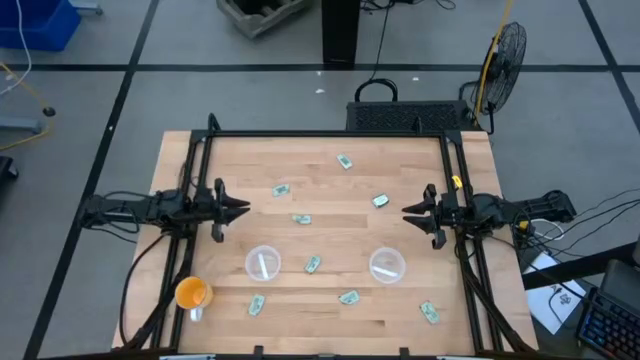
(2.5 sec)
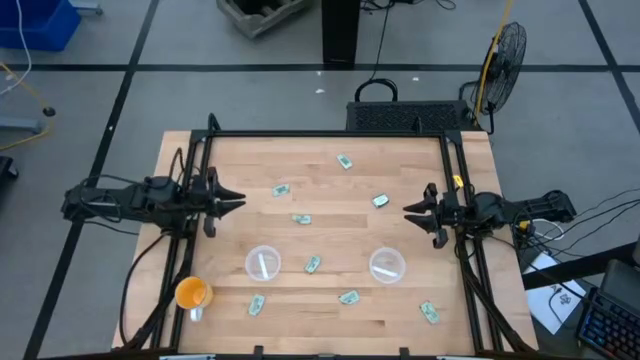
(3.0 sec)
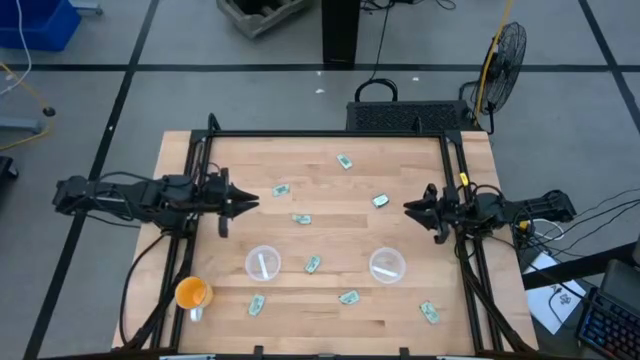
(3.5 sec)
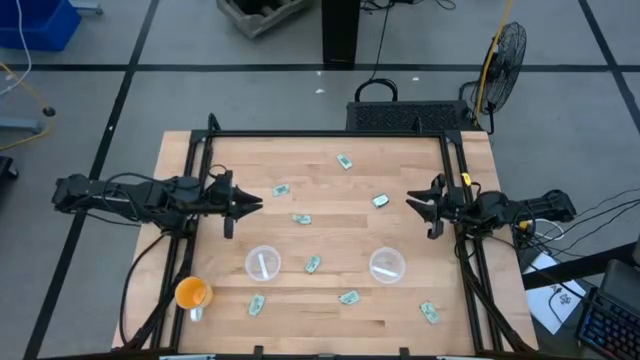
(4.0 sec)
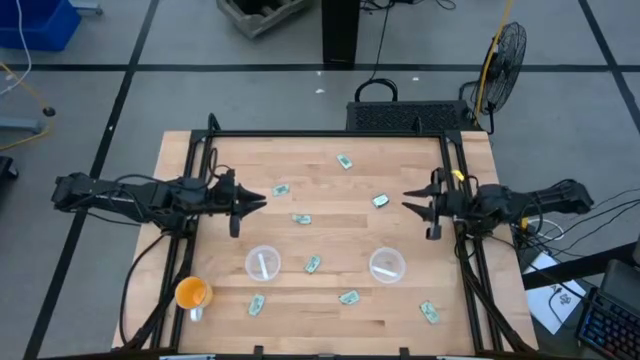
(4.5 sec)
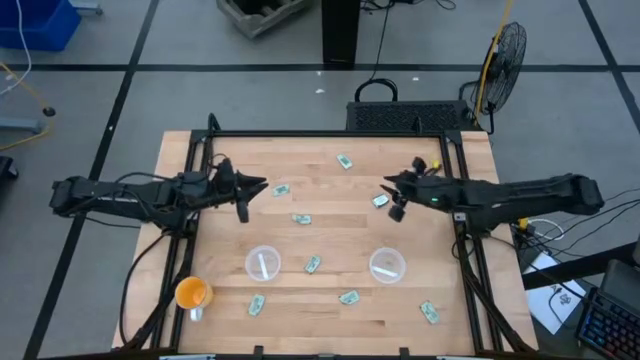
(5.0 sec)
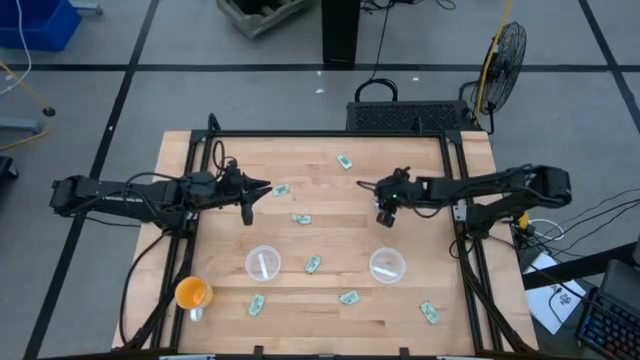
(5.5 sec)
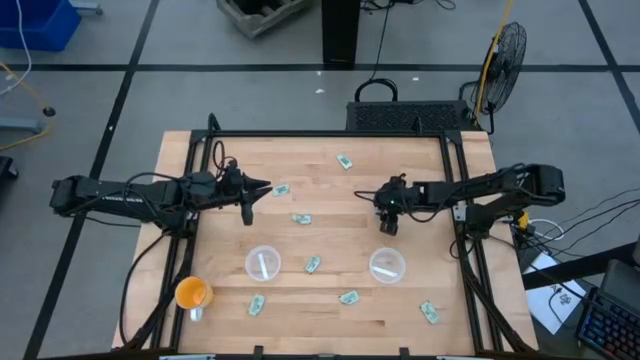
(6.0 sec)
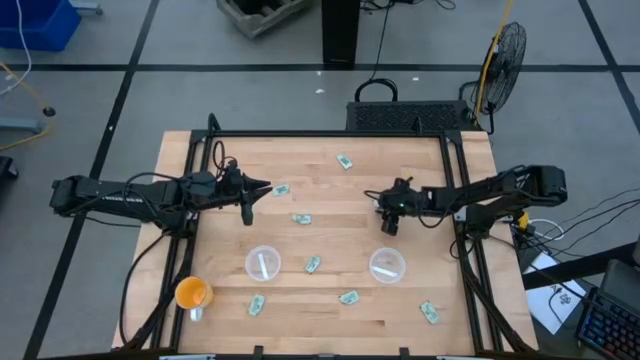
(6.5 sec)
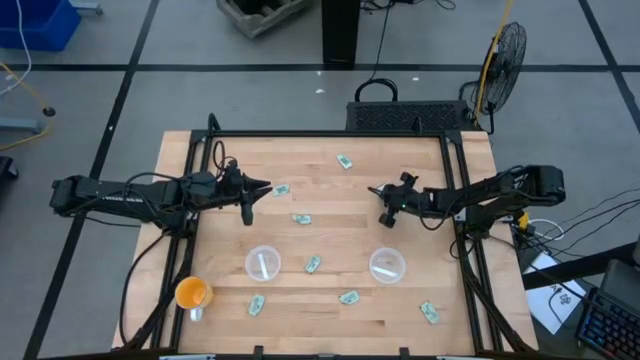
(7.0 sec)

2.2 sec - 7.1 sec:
Task: Pick and place Stevia / Truvia into bins
Put the green stevia packet into the right transparent container

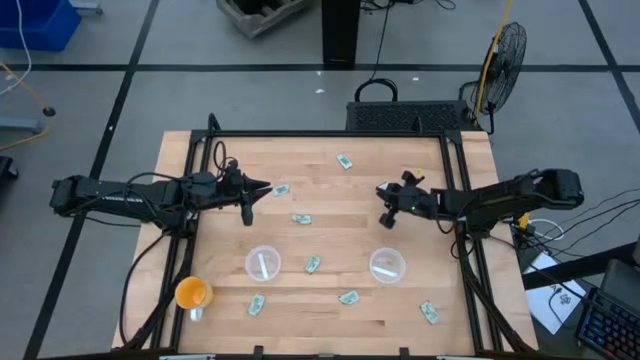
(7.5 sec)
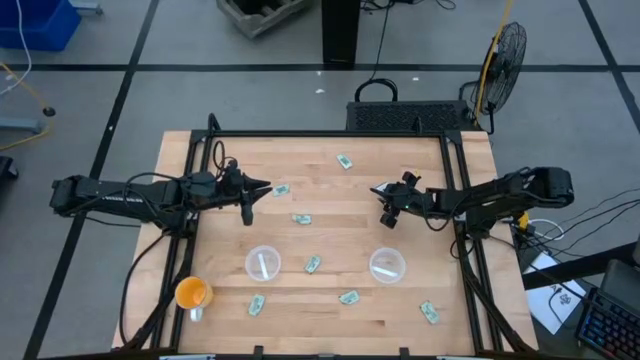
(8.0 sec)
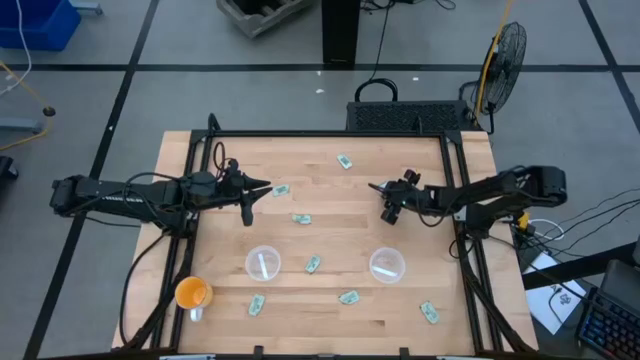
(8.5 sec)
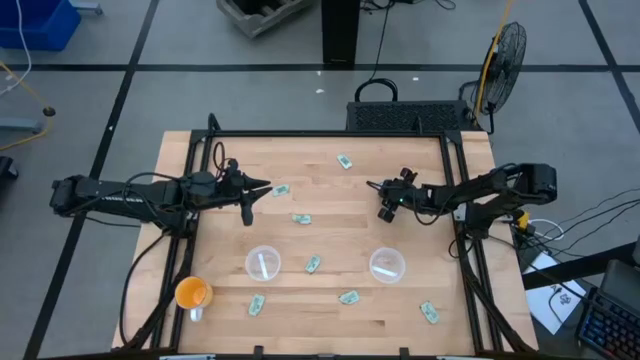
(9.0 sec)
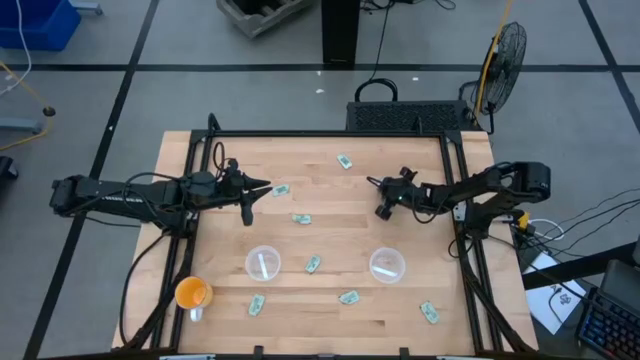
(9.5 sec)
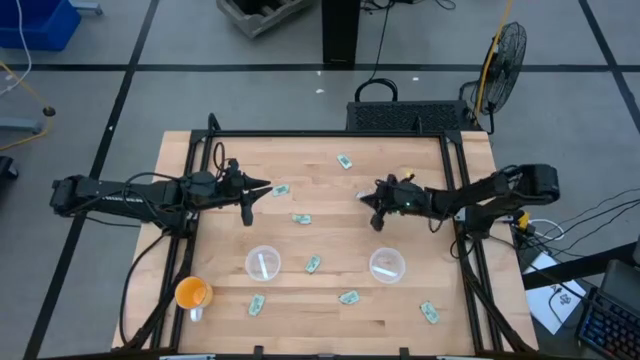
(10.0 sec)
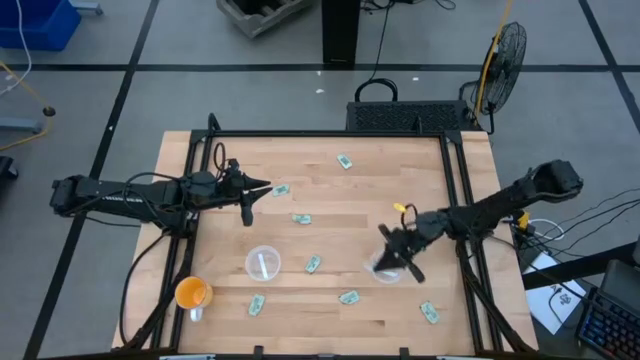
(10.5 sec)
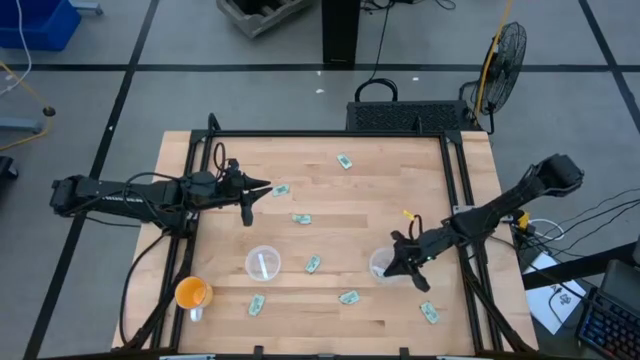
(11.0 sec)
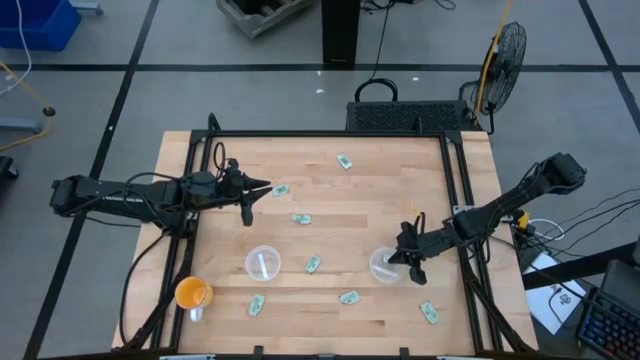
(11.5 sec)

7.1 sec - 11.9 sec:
Put the green stevia packet into the right transparent container

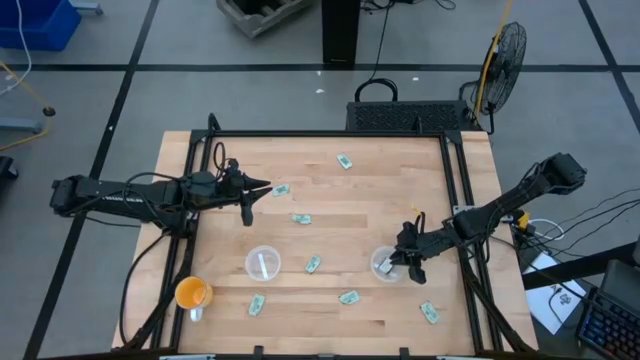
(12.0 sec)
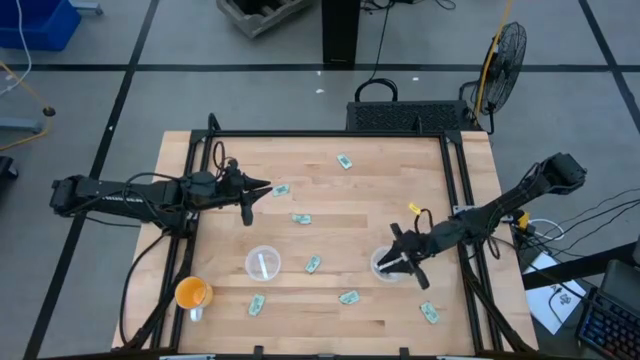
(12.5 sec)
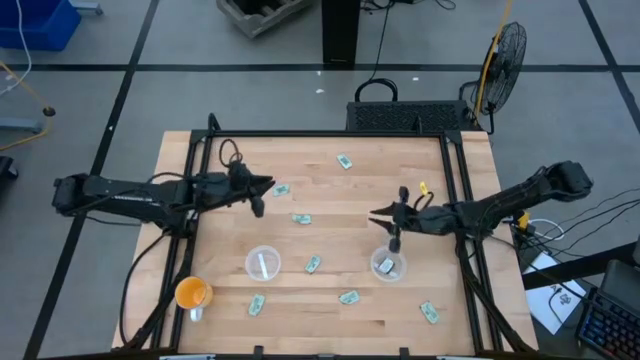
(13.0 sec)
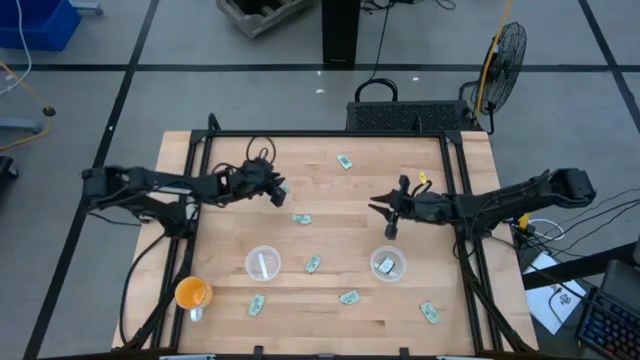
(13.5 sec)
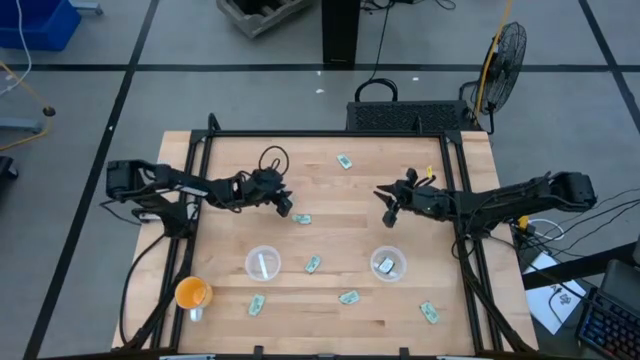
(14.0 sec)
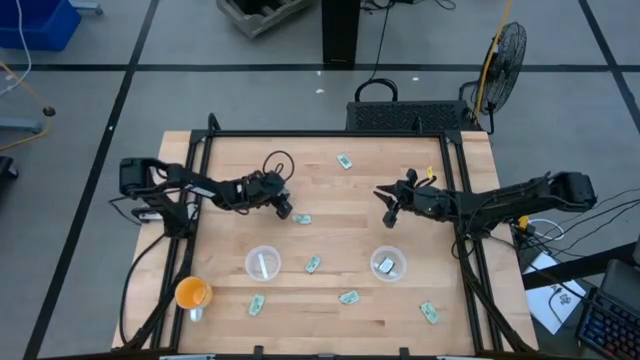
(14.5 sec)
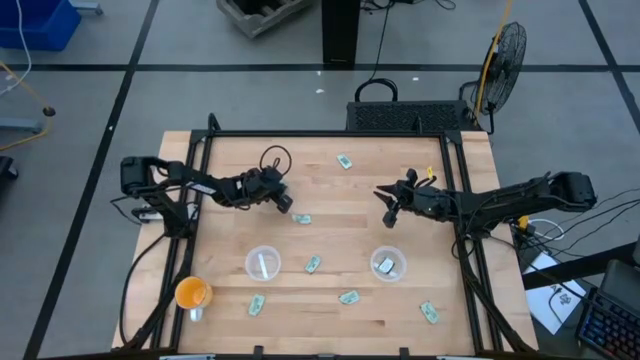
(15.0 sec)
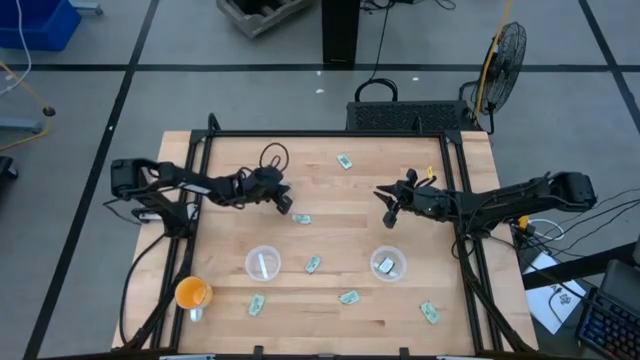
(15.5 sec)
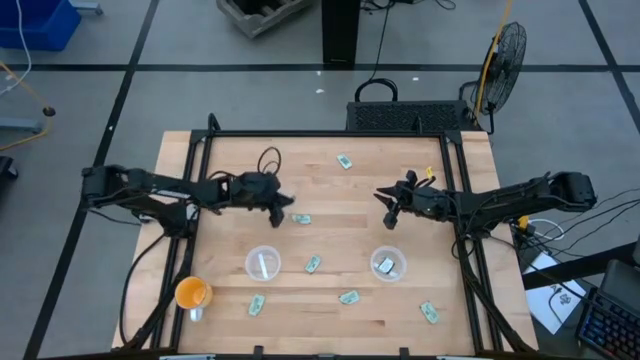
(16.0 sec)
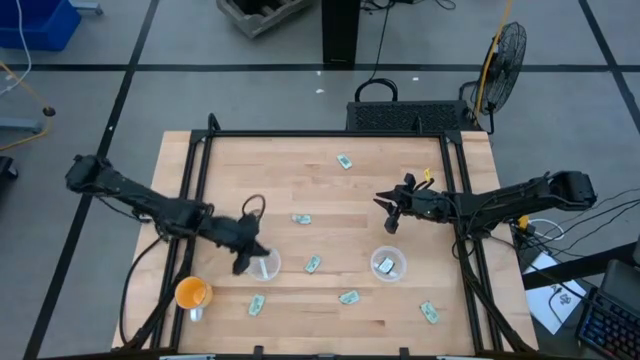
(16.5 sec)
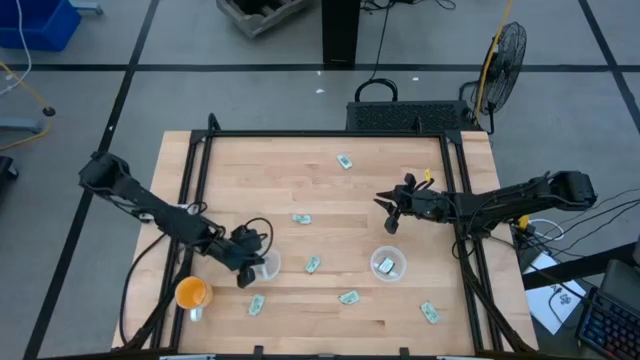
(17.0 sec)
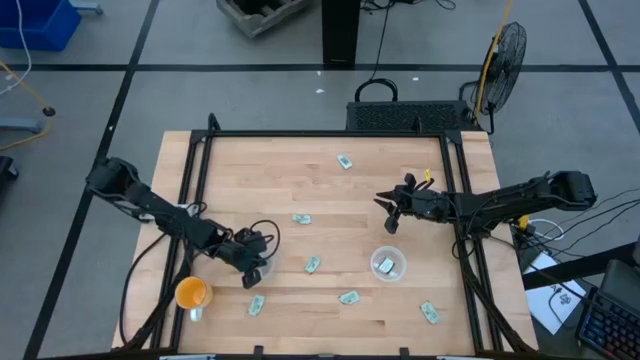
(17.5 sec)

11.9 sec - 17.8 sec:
Put the light green stevia packet into the left transparent container

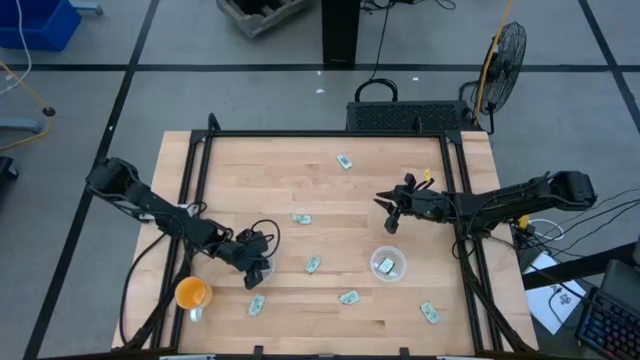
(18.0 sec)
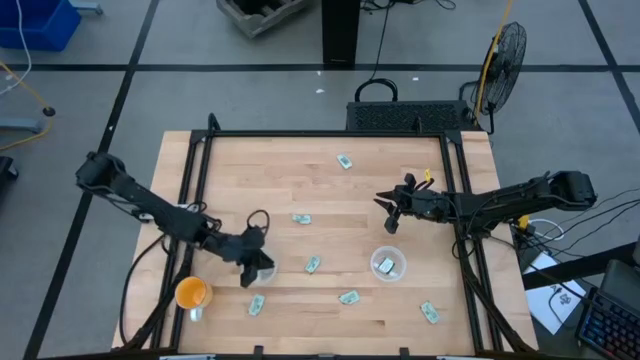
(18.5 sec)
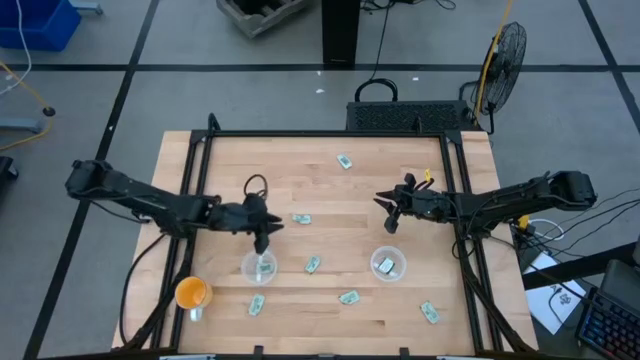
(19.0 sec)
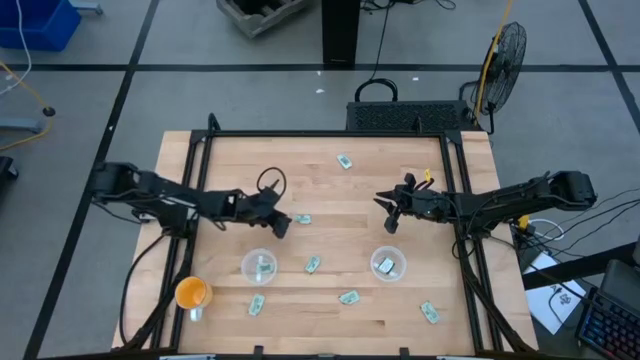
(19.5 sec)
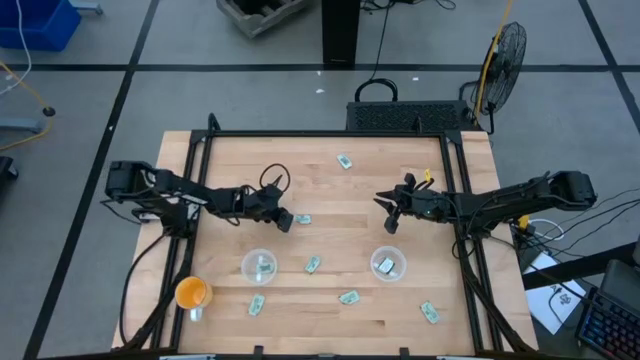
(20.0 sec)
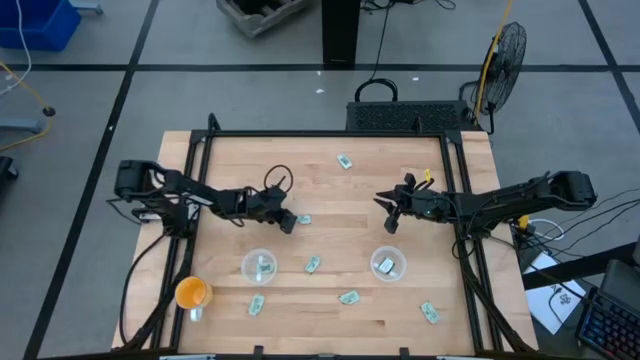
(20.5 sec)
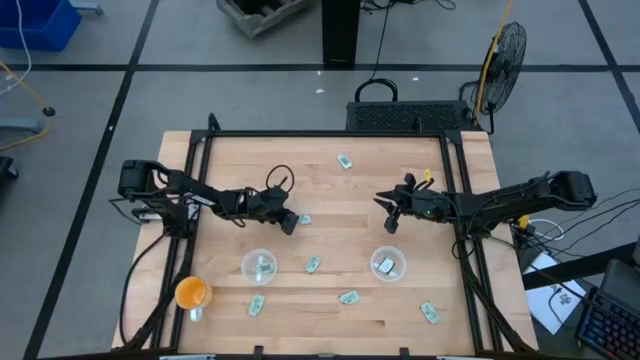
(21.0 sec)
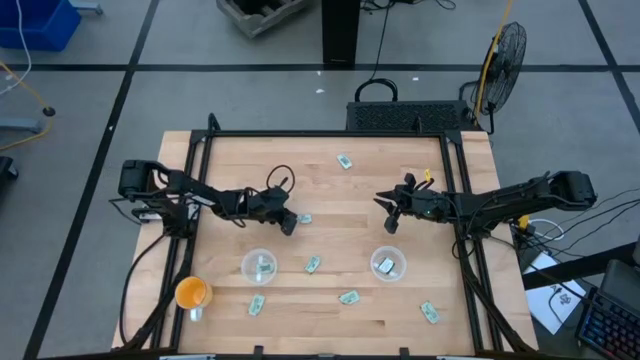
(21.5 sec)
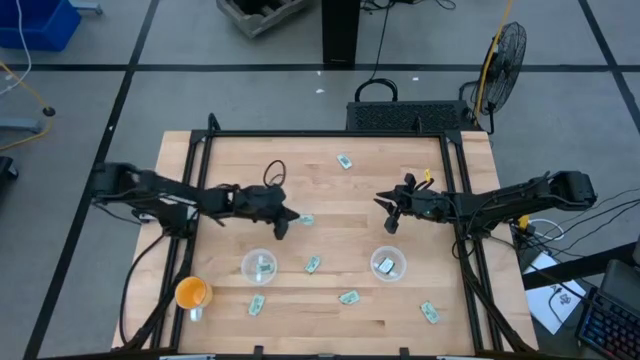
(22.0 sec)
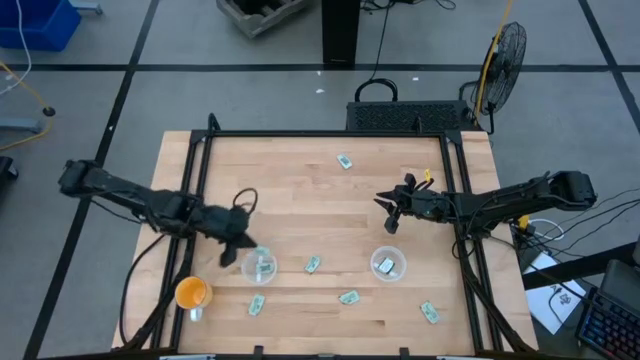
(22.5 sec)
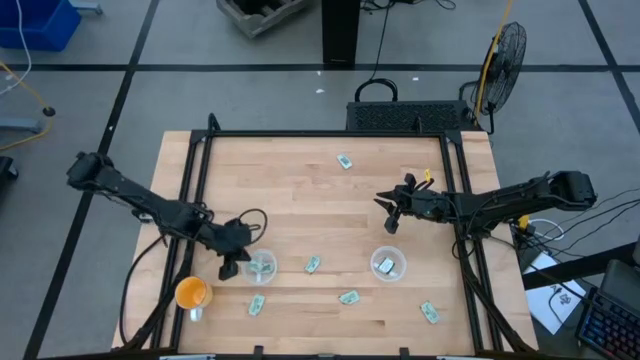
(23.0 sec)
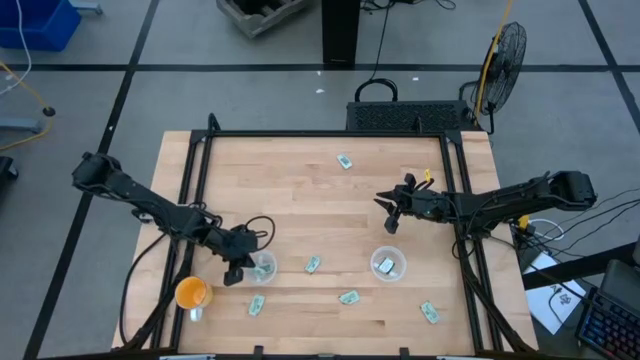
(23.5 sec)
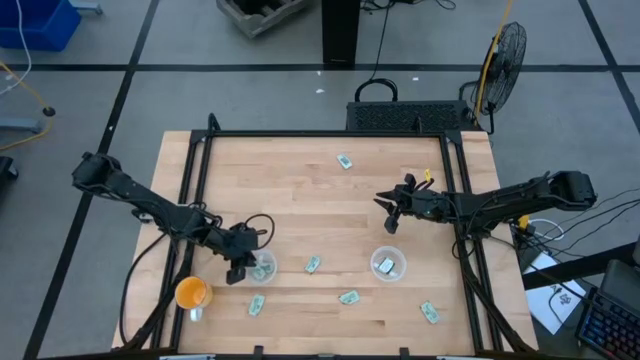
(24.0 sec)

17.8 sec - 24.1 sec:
Put the light green stevia packet into the left transparent container
